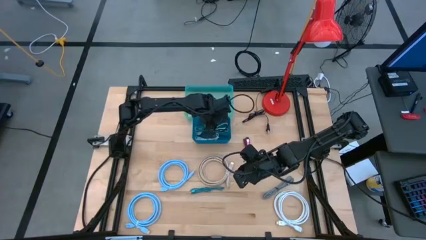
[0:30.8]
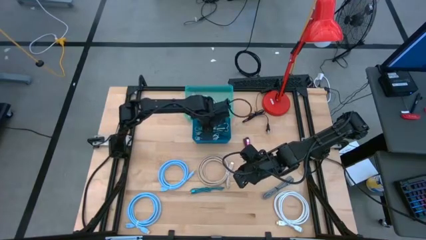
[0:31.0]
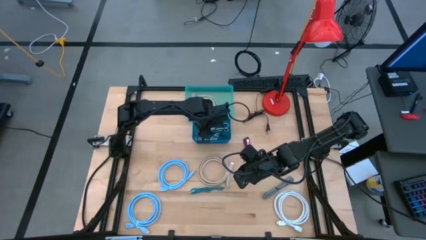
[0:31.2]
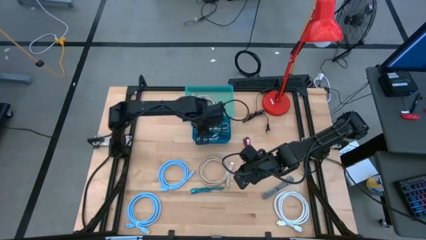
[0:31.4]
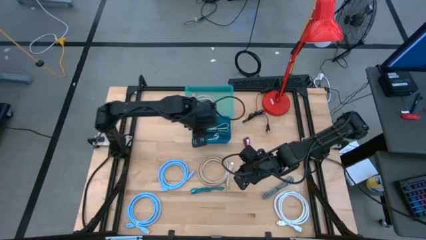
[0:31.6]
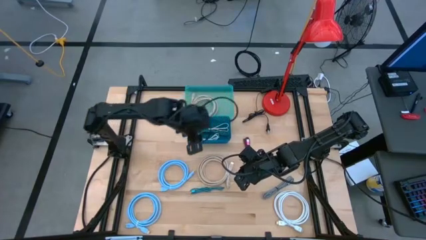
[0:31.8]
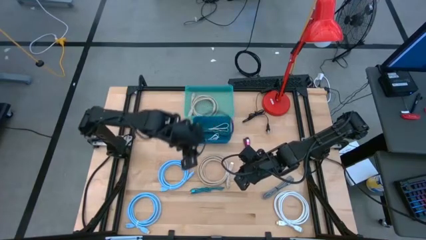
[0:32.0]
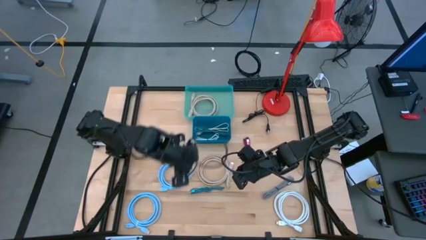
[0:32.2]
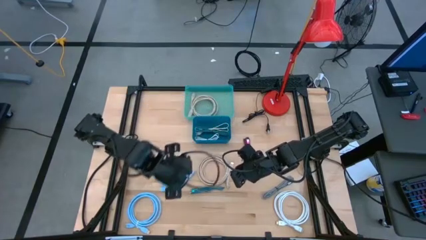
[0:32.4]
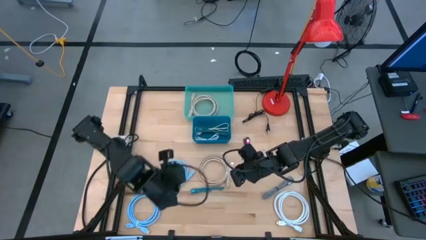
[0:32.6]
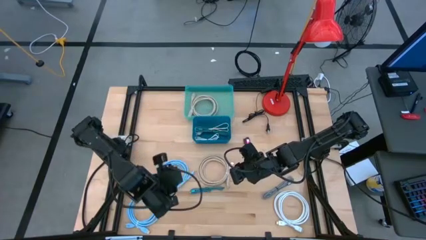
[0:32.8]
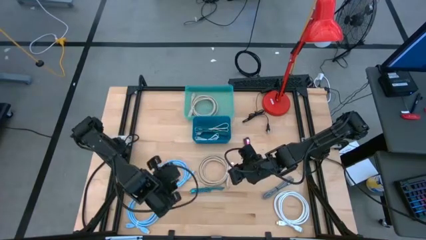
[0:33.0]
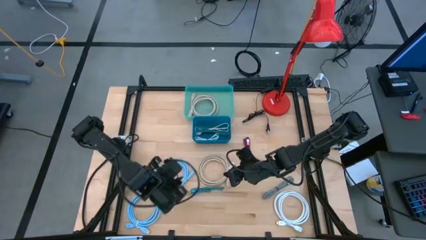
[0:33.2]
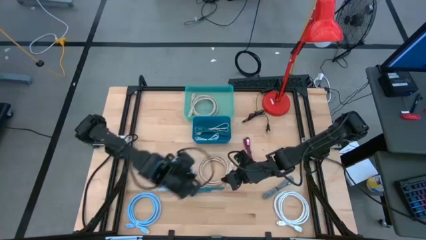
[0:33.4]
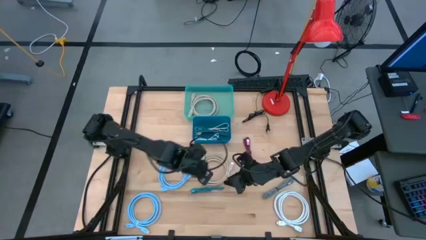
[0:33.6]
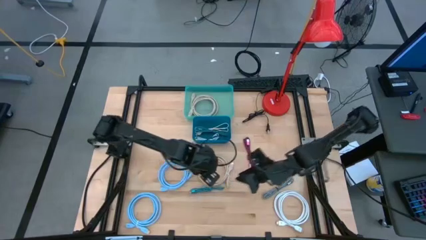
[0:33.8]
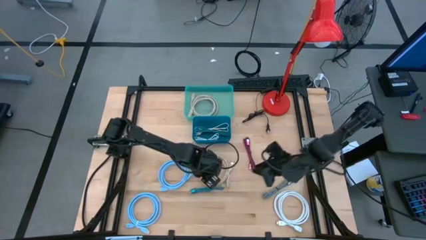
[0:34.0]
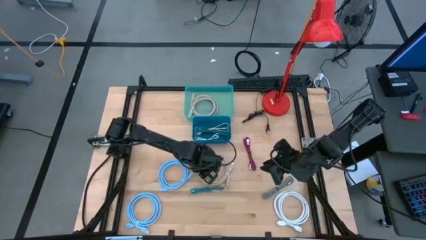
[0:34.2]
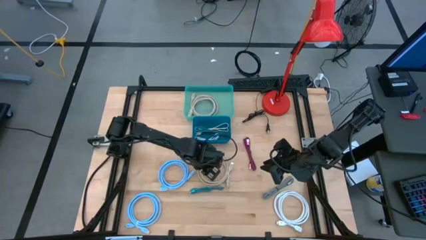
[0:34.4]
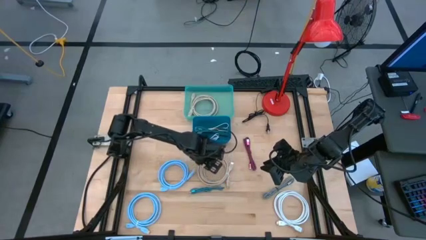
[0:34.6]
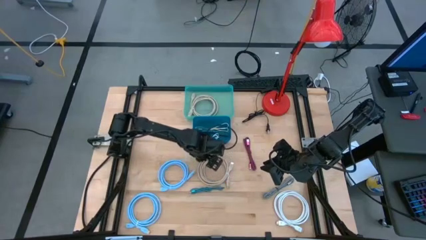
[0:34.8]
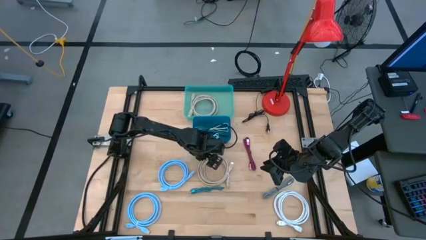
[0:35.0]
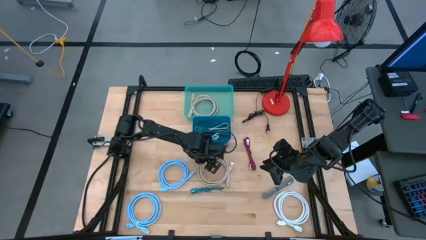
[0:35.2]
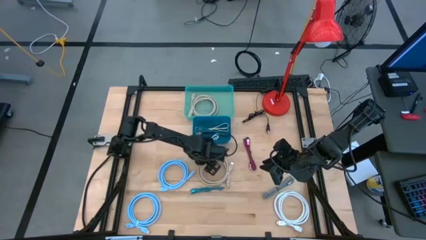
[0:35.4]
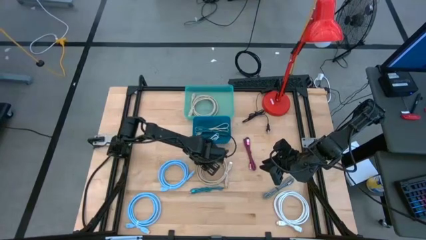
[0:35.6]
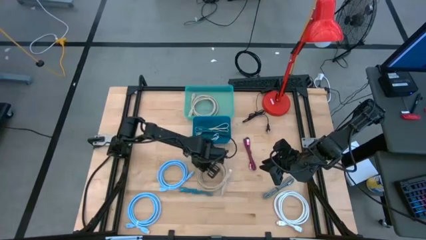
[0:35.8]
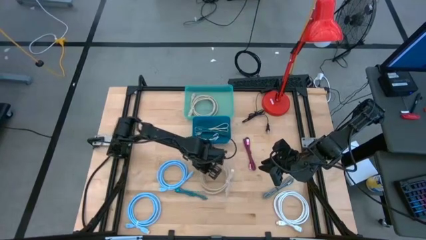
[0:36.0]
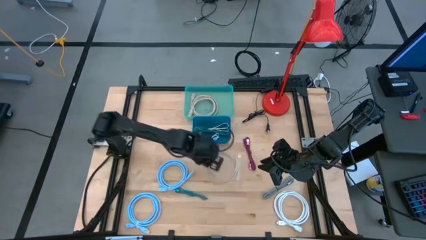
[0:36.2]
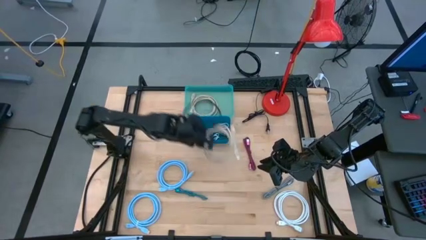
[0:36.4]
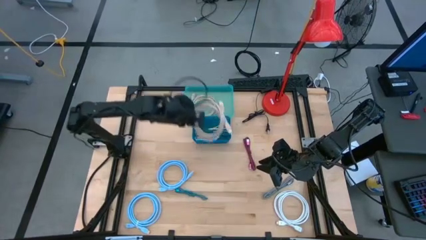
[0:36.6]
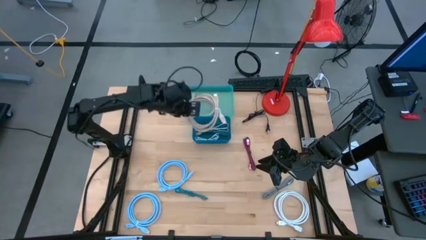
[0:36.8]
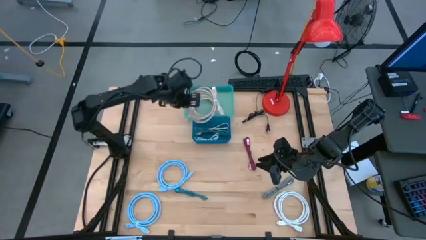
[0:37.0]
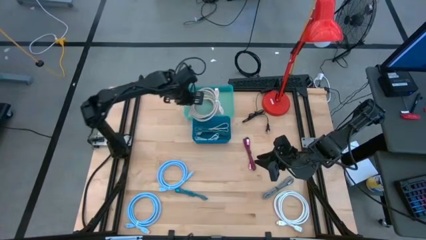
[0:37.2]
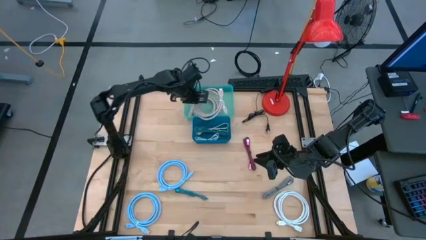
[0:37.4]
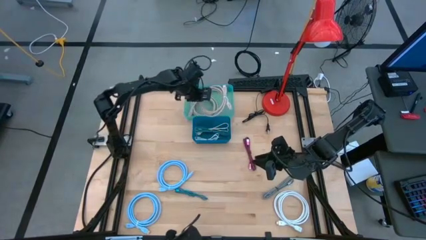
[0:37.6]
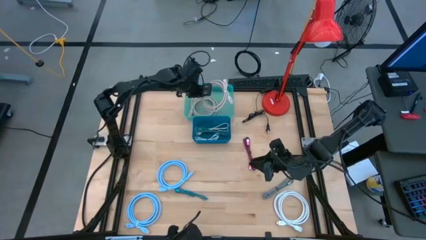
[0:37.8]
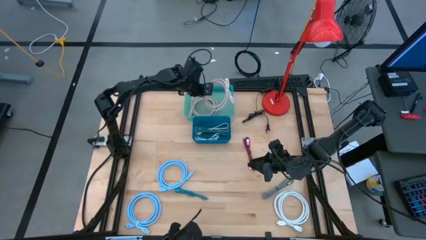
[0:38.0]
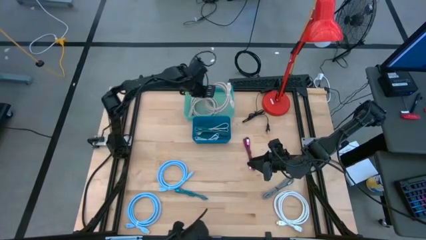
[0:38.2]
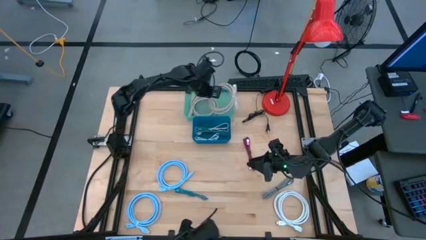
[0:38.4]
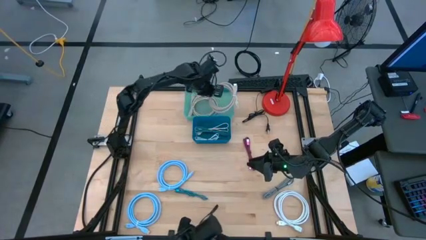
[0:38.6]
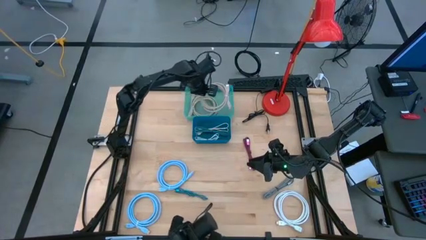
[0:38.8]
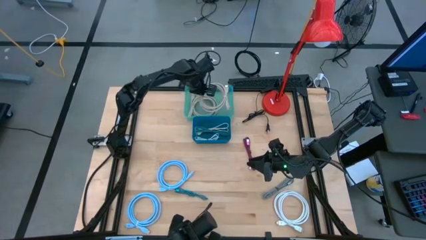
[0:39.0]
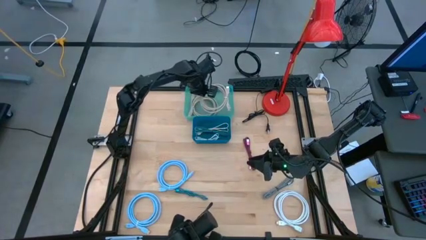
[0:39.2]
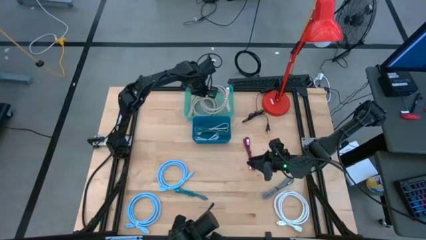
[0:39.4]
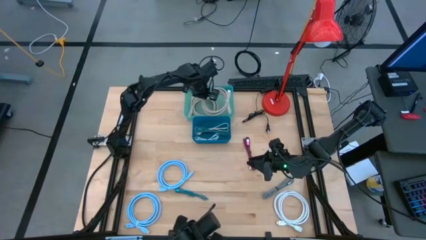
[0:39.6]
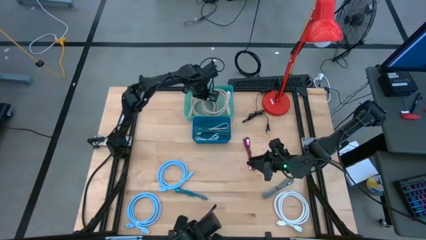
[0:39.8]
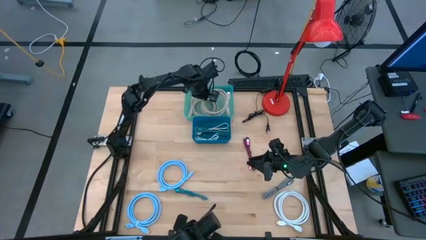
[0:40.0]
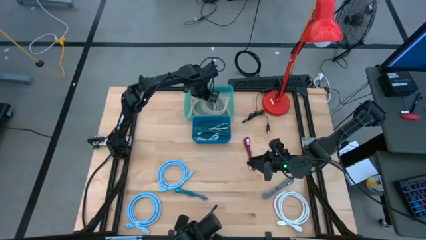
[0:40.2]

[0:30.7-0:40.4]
Task: Pick & Place USB Port
Put the brown display cable into the green bin

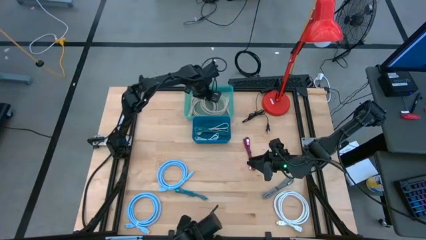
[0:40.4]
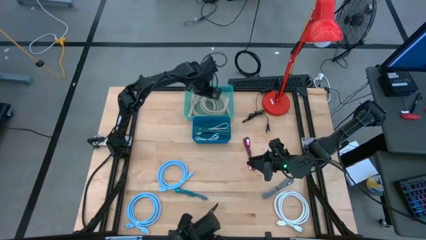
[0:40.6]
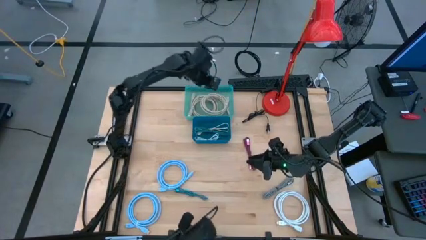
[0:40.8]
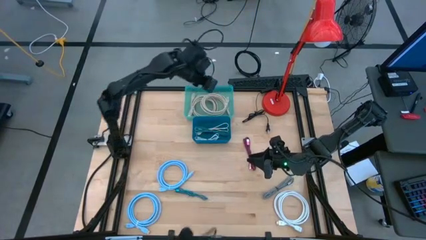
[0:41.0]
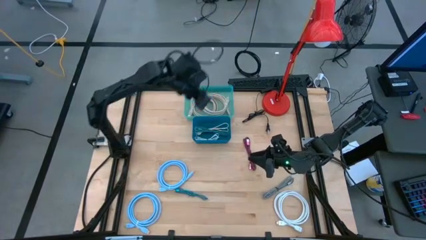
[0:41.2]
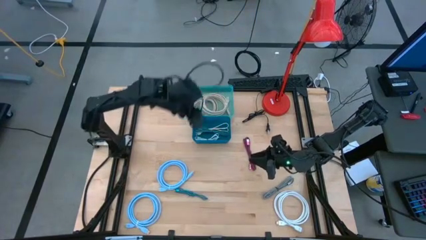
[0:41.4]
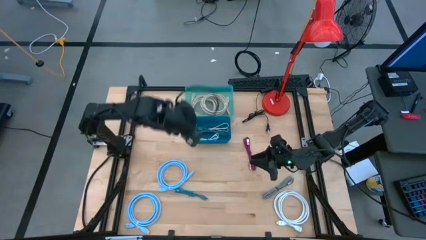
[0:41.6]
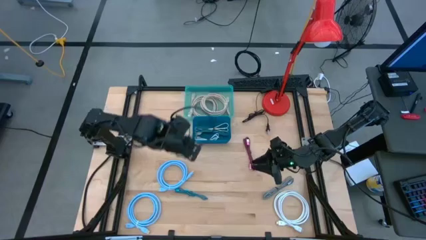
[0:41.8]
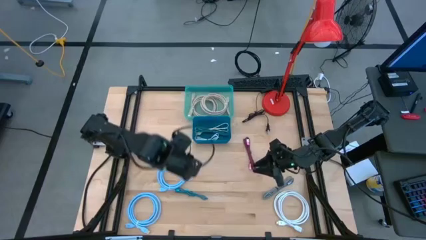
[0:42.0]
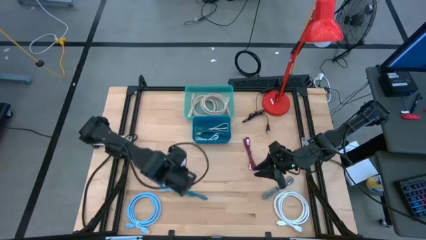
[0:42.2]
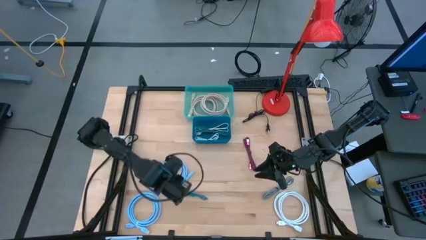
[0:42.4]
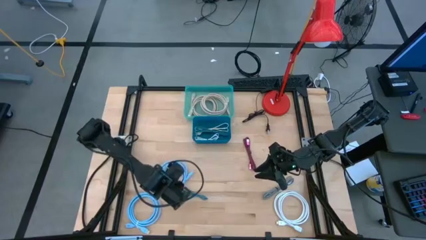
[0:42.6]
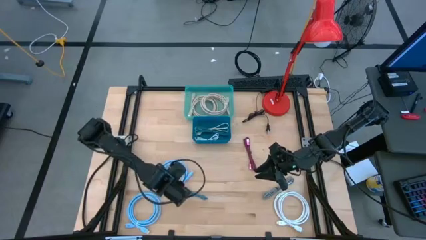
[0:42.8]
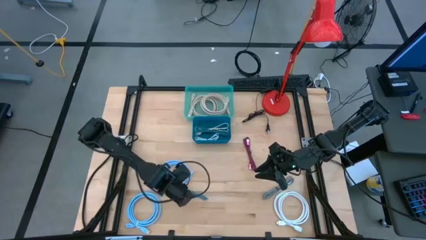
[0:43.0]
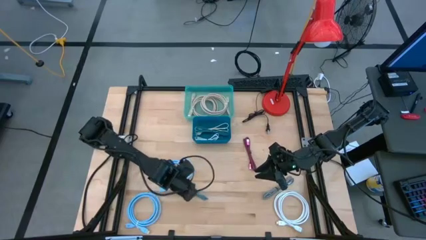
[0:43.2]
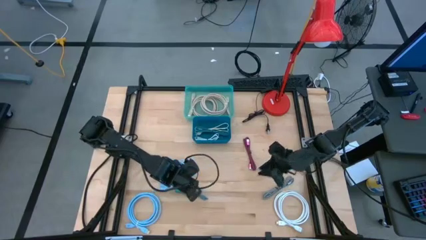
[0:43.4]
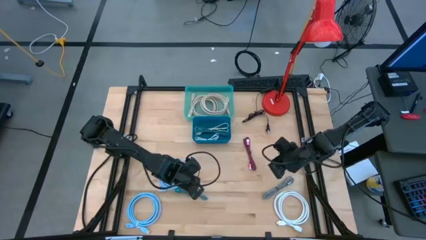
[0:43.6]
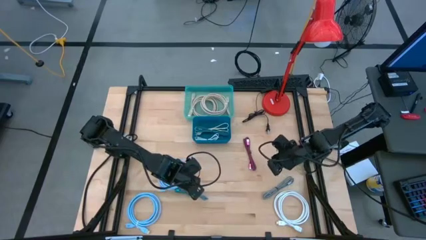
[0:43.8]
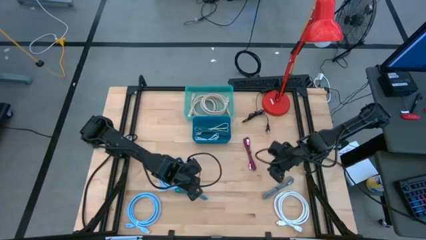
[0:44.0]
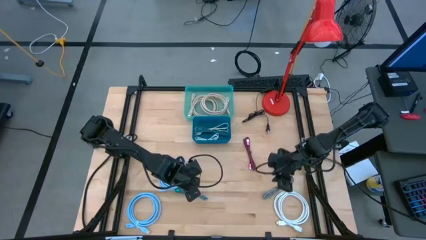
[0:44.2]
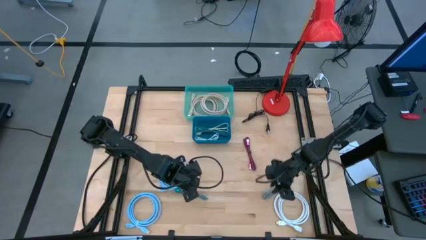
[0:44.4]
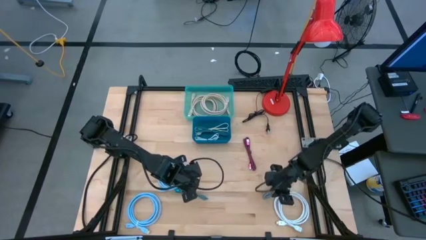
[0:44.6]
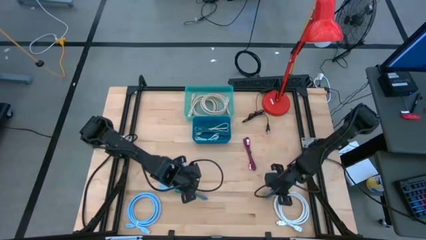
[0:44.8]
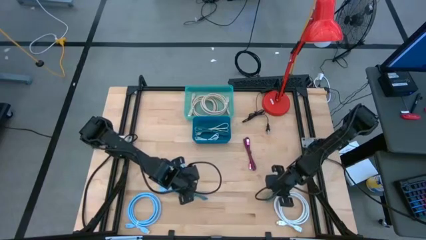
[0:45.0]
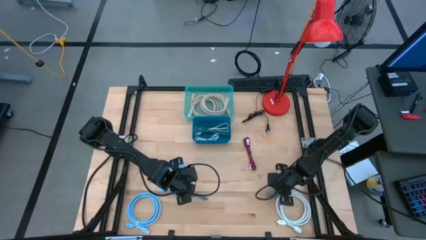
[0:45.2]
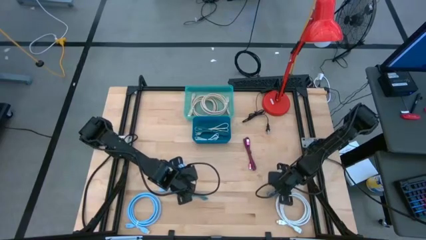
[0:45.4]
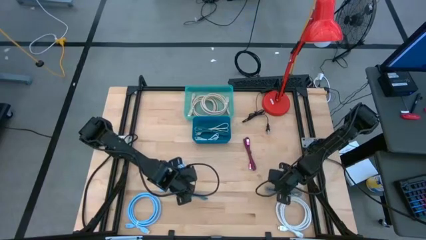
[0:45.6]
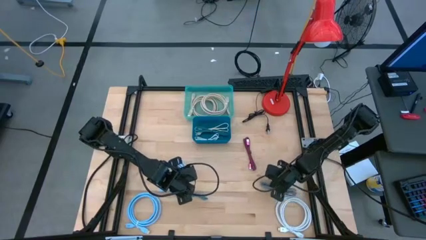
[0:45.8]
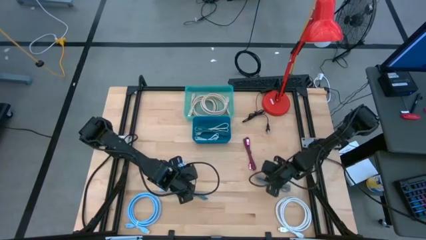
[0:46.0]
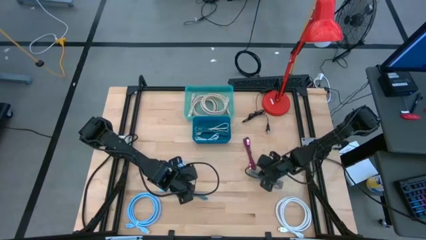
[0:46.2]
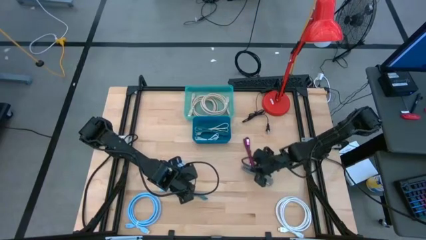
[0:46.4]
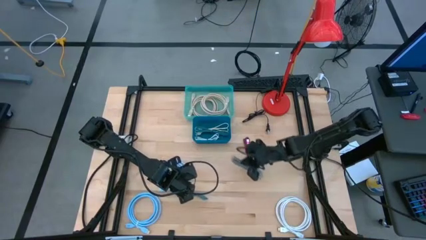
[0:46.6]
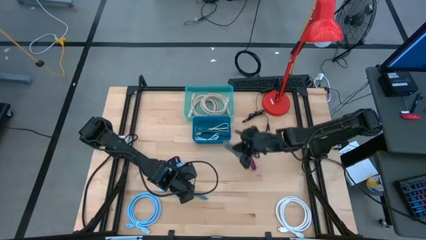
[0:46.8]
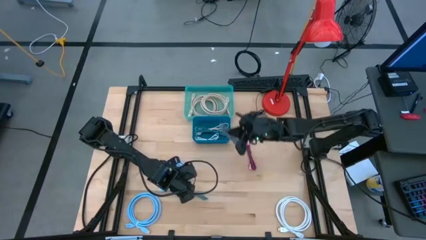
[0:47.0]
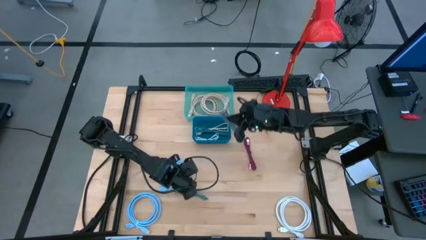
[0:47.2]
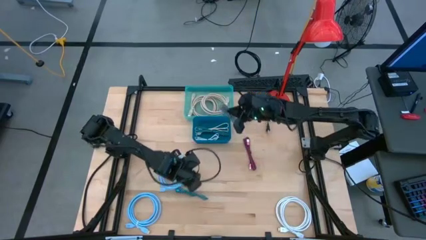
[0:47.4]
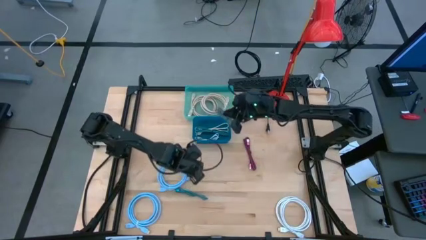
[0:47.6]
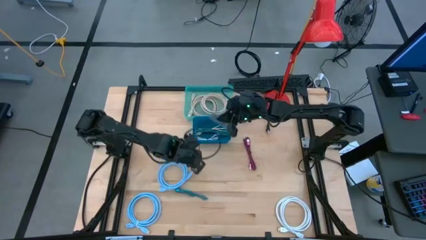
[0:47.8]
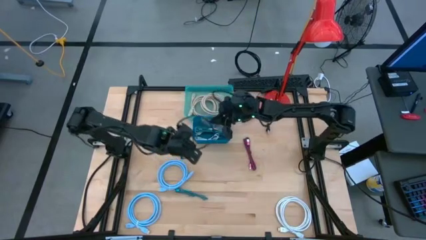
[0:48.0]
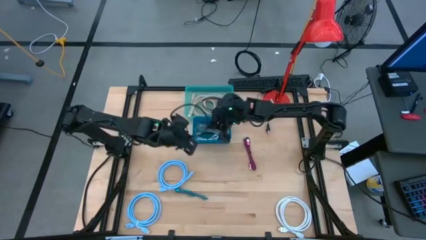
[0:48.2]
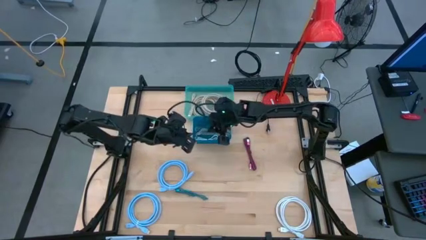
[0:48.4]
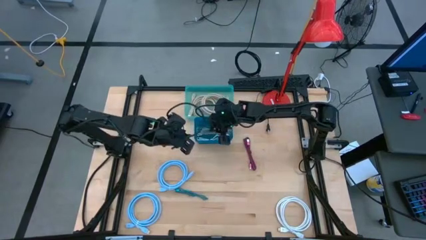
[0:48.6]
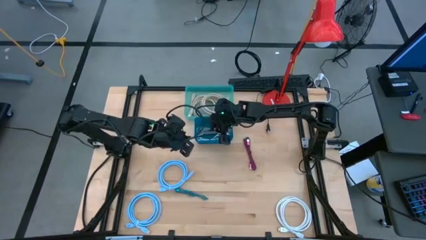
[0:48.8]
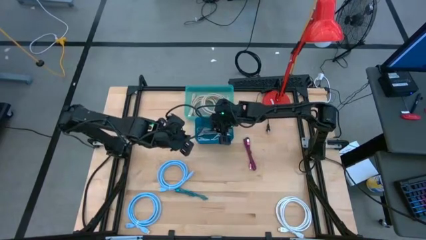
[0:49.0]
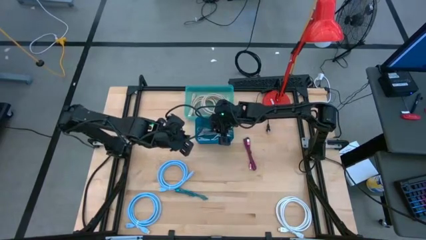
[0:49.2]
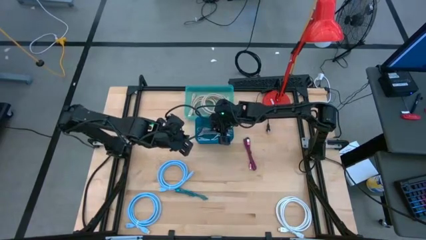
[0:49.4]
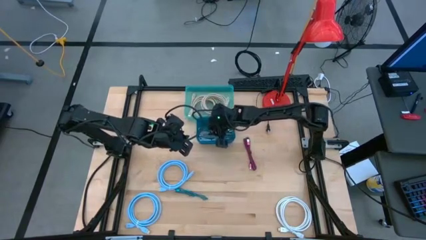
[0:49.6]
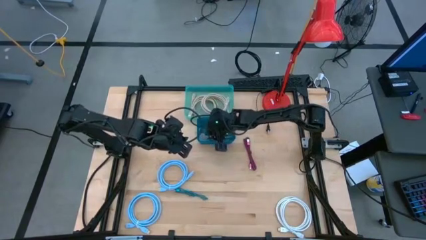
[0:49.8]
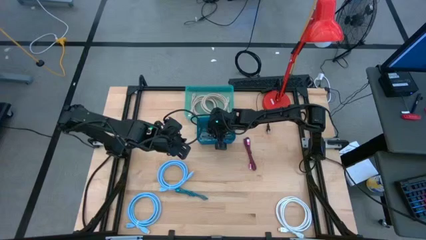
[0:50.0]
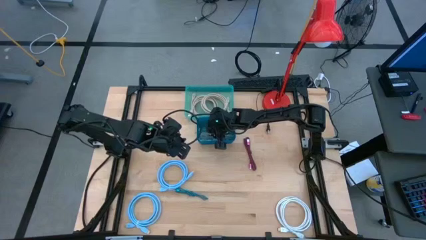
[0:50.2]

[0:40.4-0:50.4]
Put the white patterned charger cable into the blue bin
